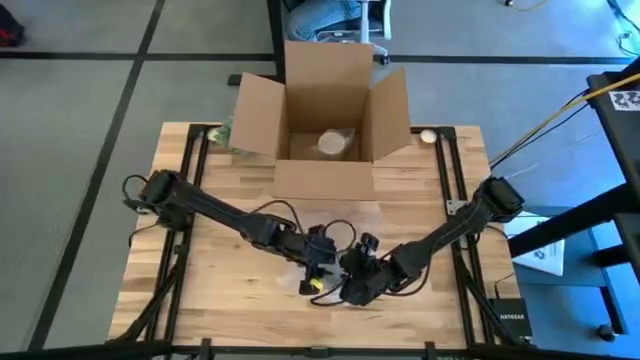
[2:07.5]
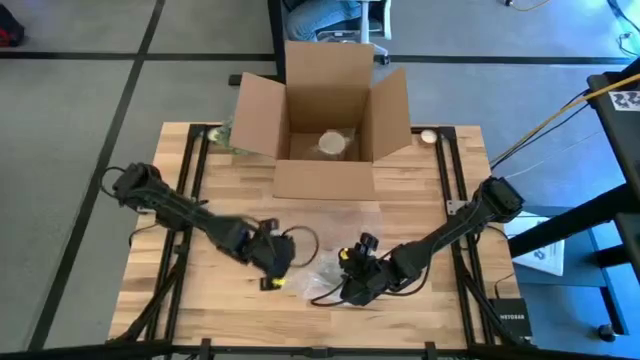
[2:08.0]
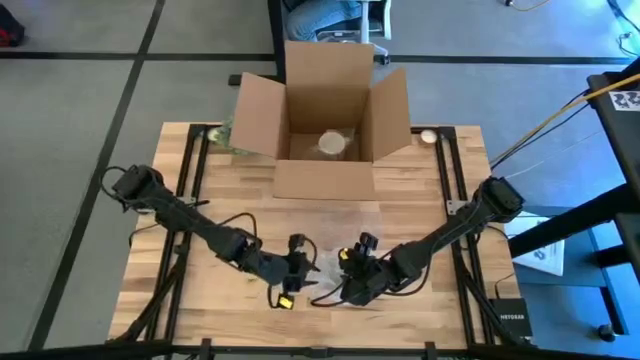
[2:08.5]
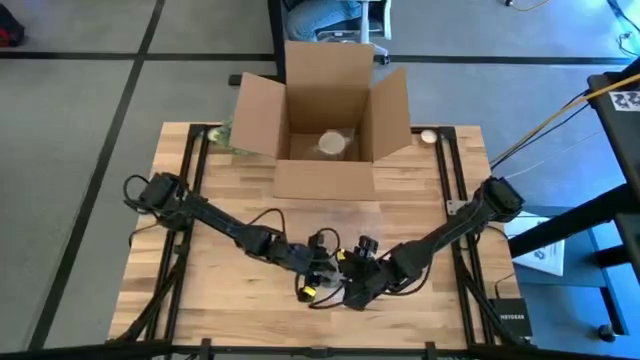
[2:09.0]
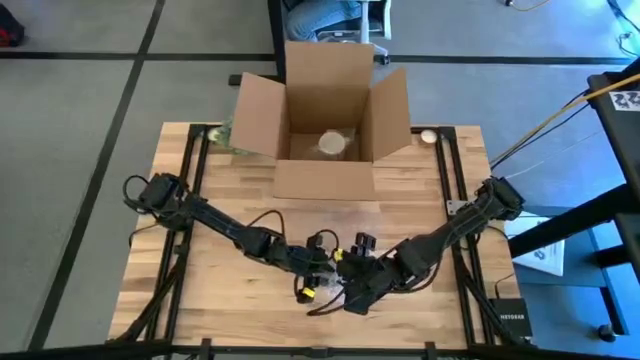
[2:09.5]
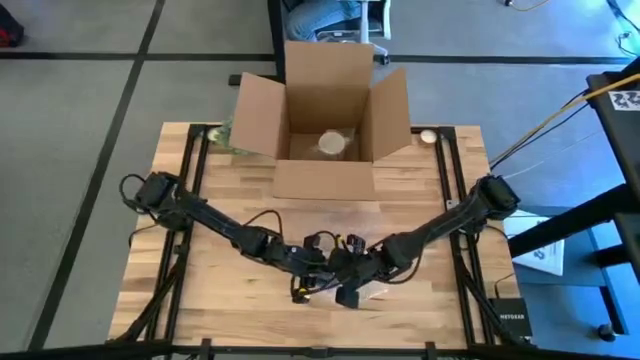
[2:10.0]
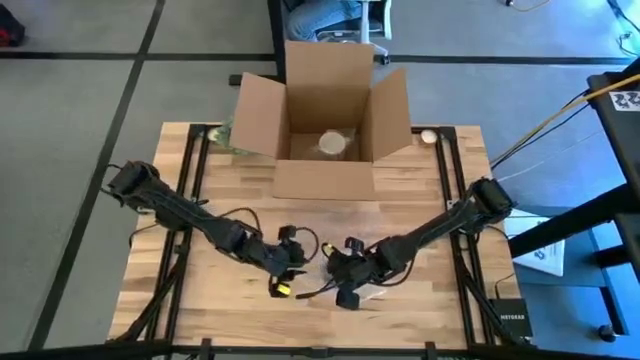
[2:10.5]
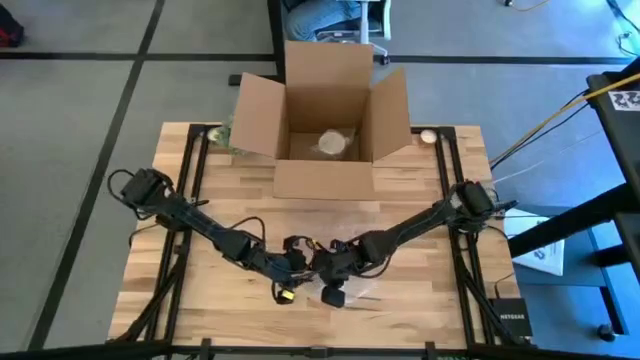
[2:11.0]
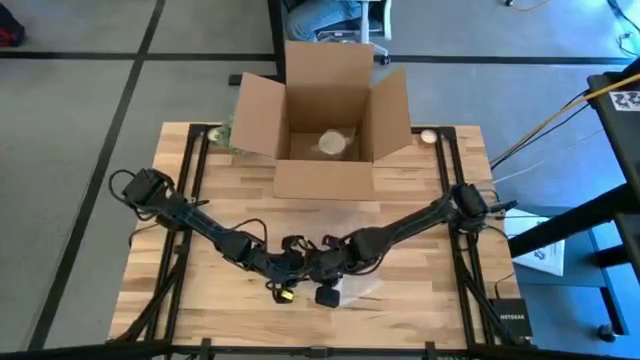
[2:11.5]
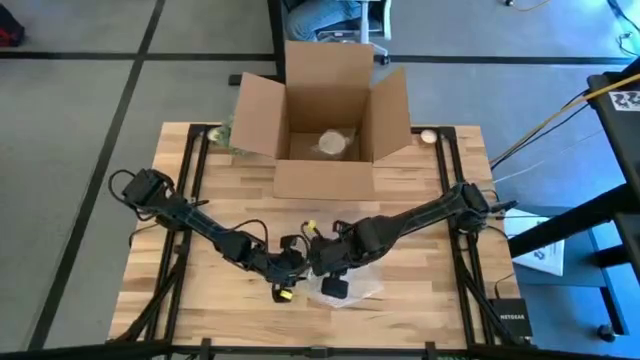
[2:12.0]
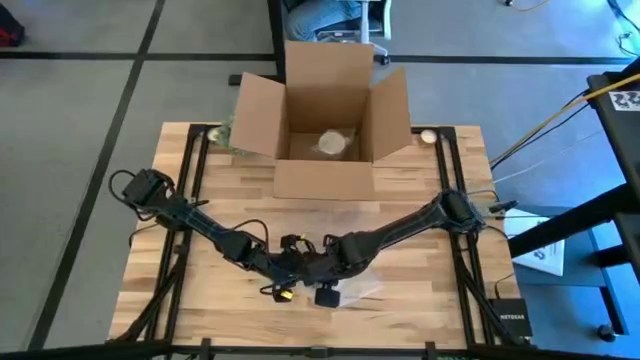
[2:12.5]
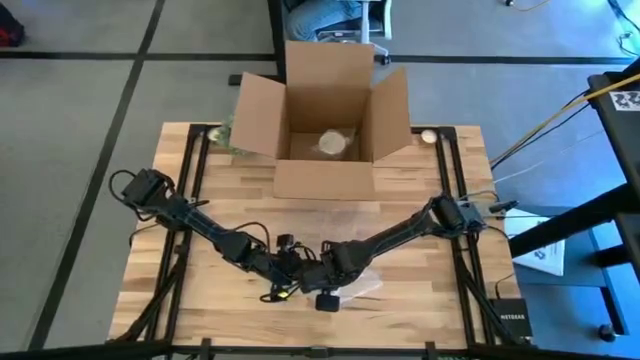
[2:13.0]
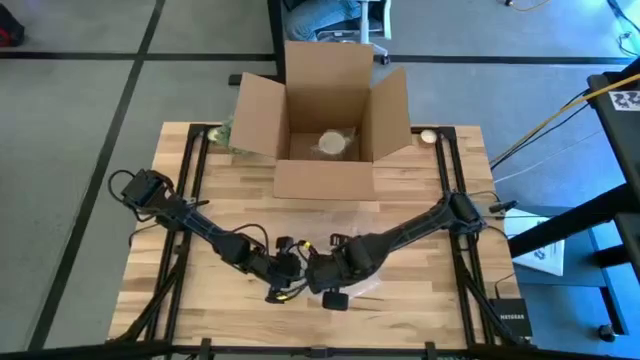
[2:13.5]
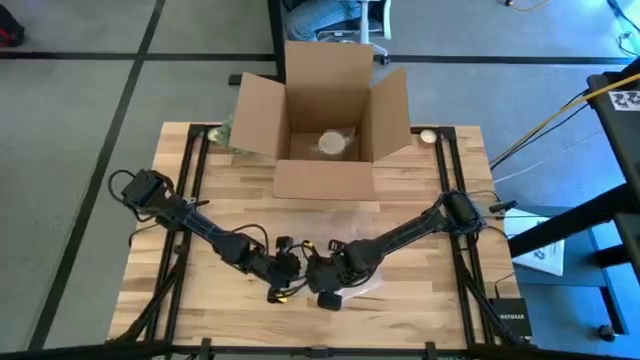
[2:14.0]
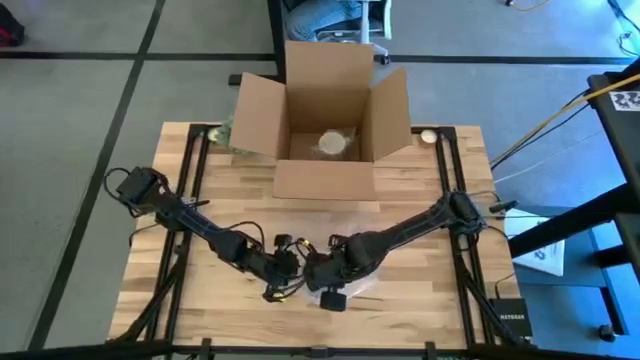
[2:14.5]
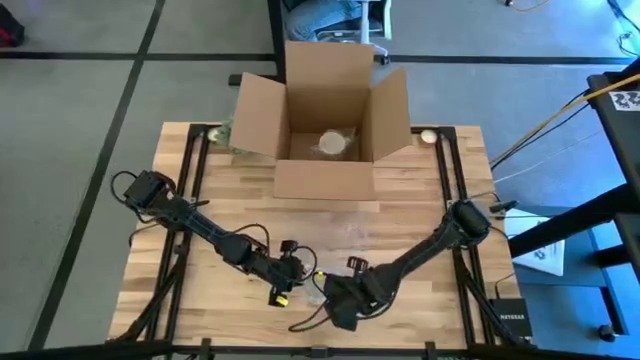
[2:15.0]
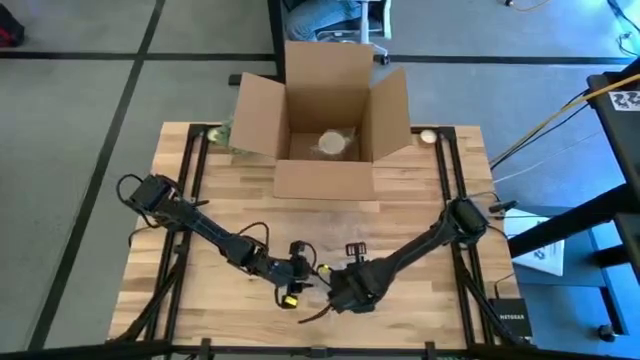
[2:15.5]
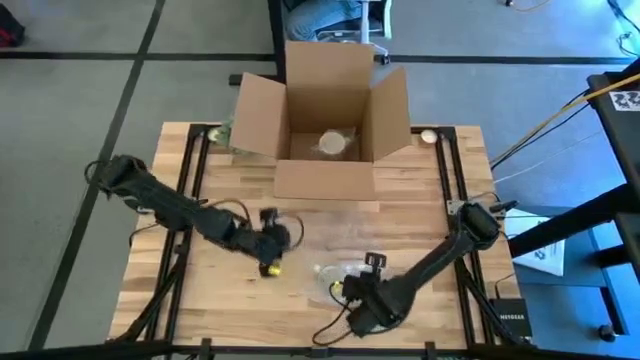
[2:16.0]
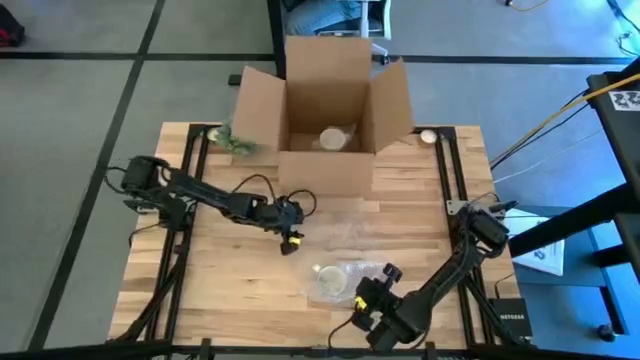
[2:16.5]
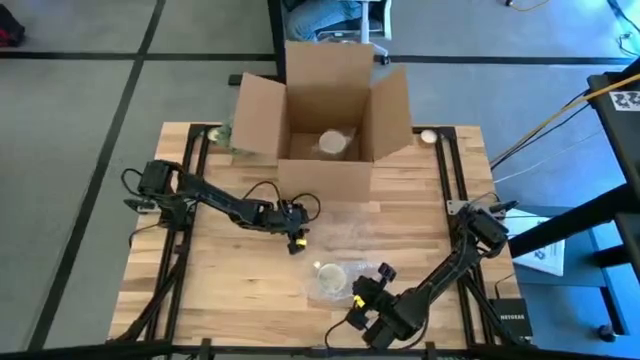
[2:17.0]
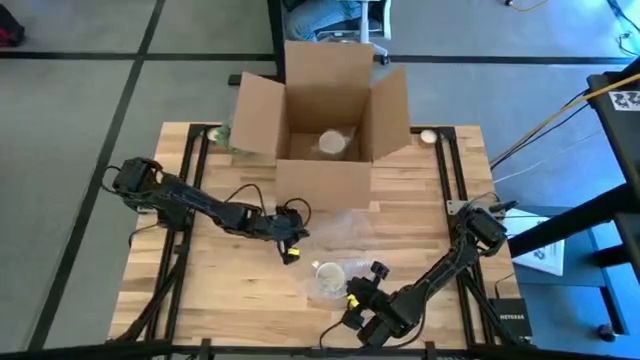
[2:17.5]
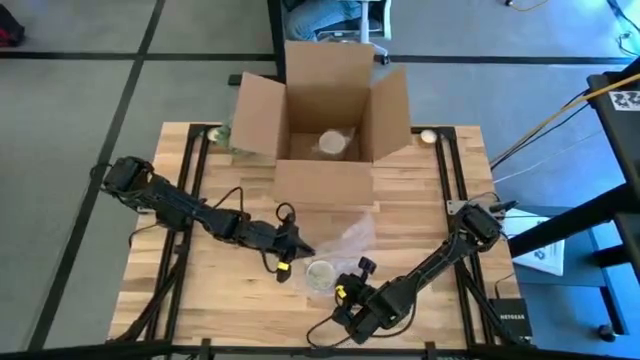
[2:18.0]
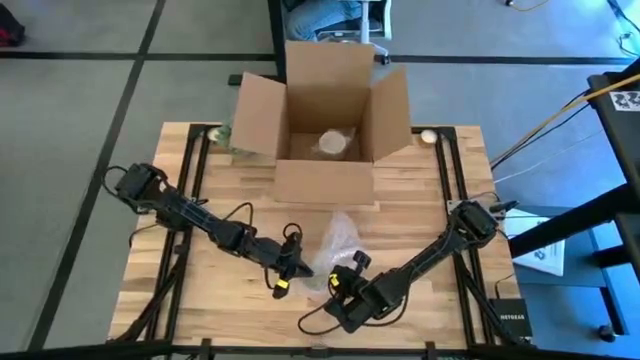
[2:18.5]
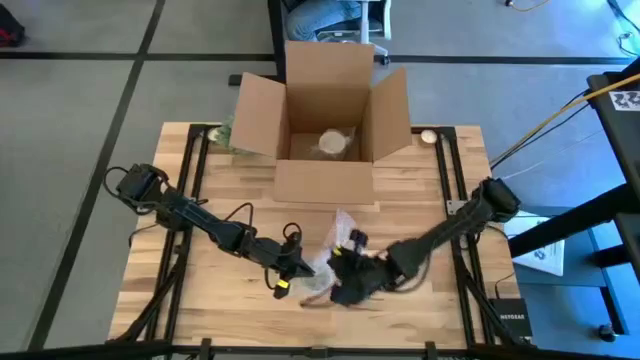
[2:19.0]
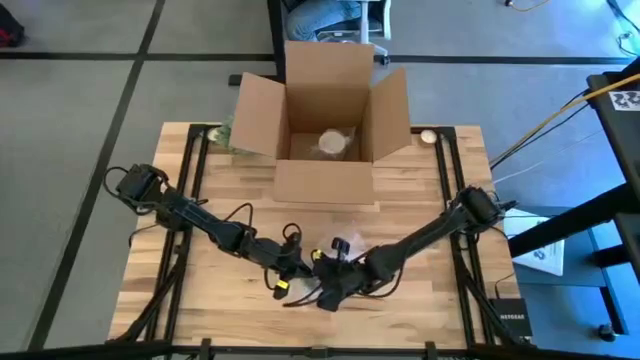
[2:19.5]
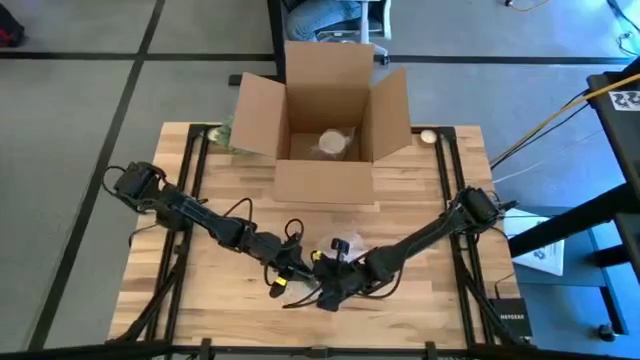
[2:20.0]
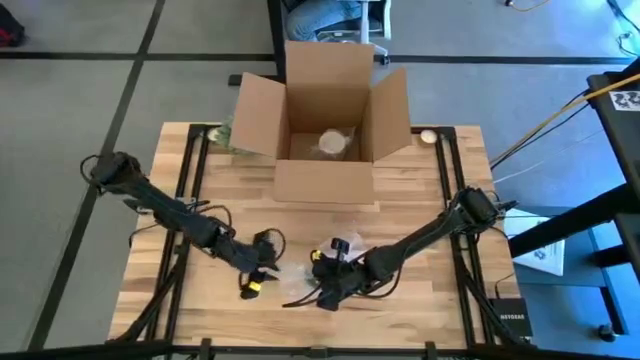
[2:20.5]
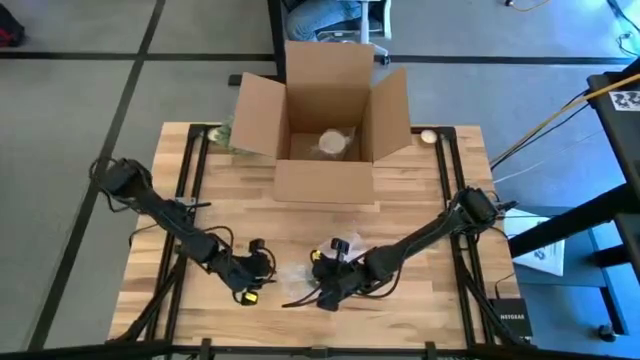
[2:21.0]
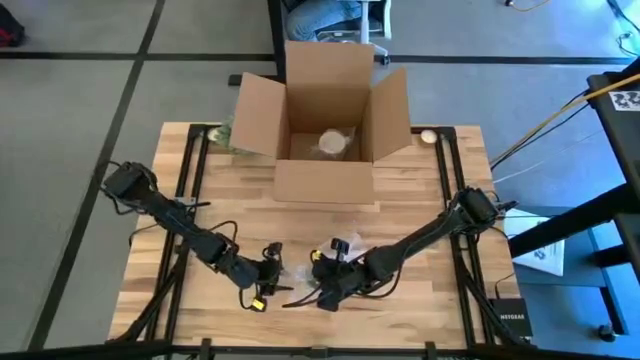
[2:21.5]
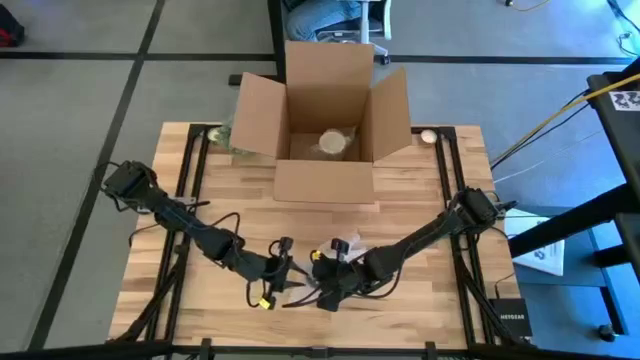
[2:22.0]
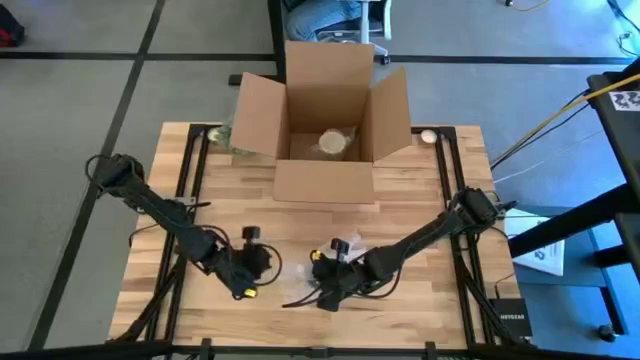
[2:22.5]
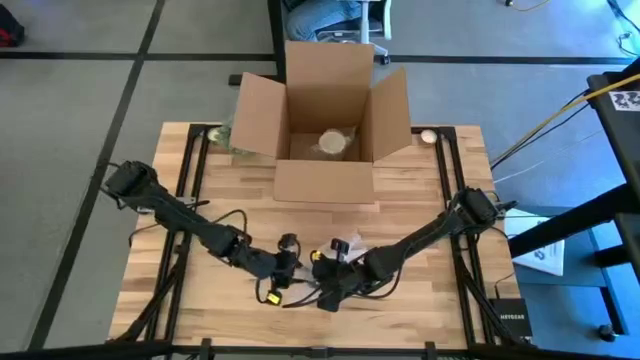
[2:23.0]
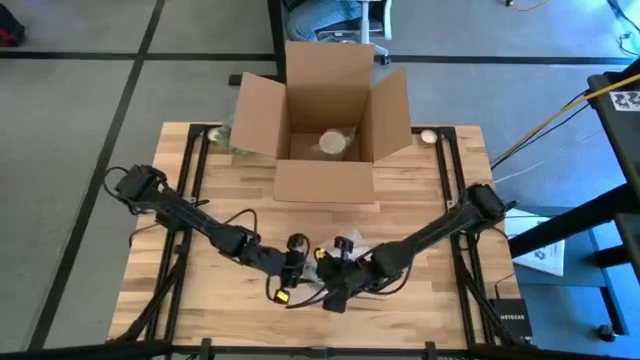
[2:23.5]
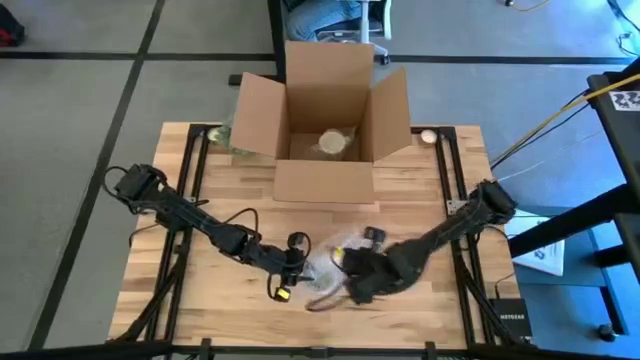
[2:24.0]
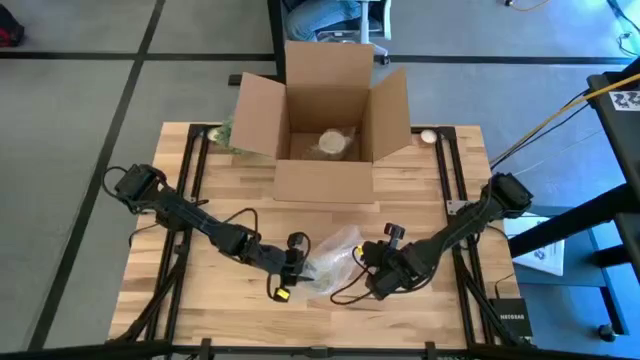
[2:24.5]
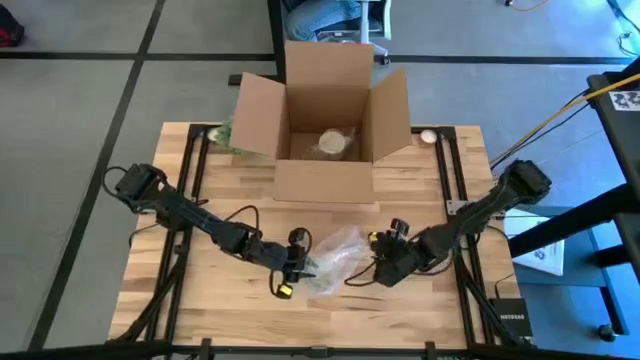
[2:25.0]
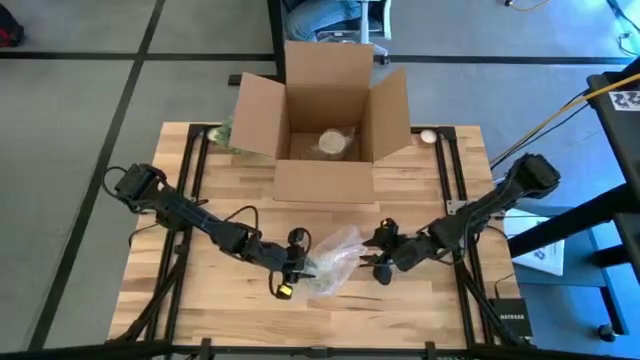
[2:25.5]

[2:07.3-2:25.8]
Task: wrap mug
Wrap the red mug with bubble wrap

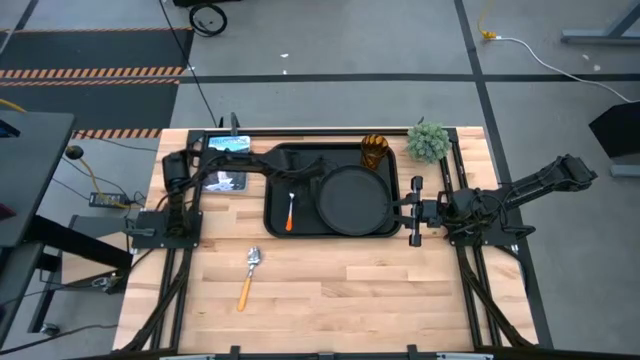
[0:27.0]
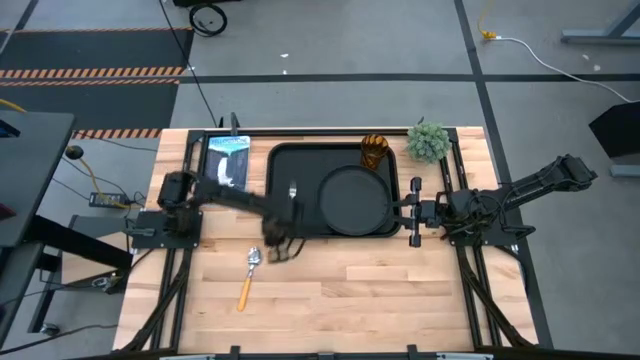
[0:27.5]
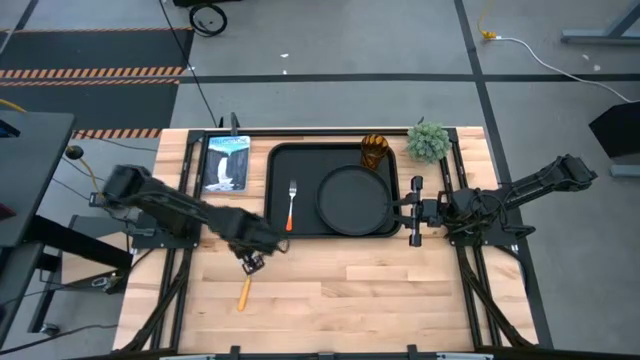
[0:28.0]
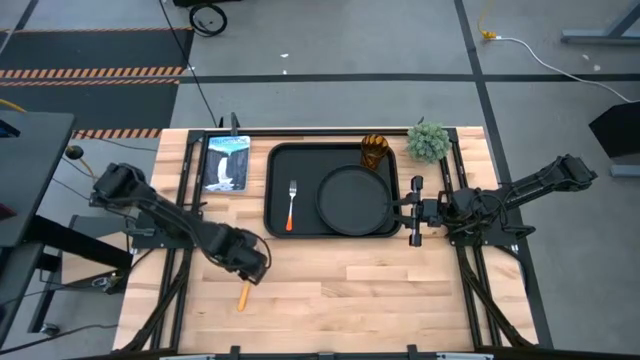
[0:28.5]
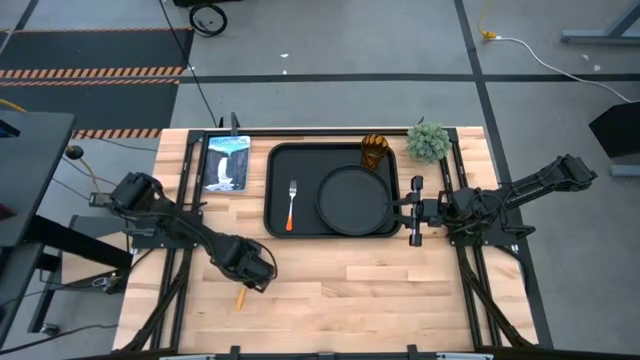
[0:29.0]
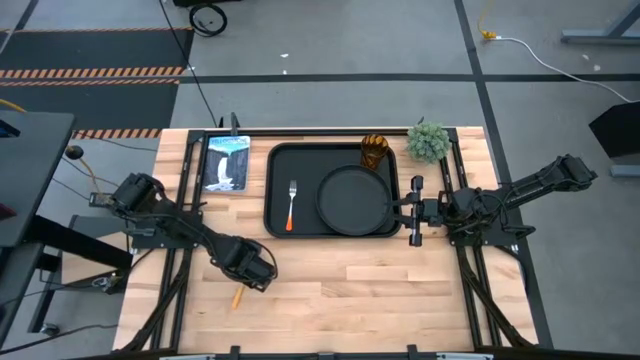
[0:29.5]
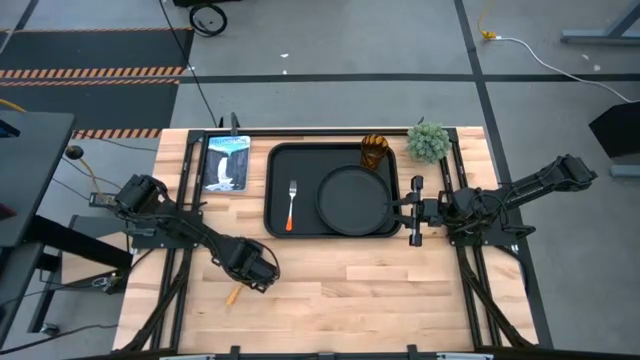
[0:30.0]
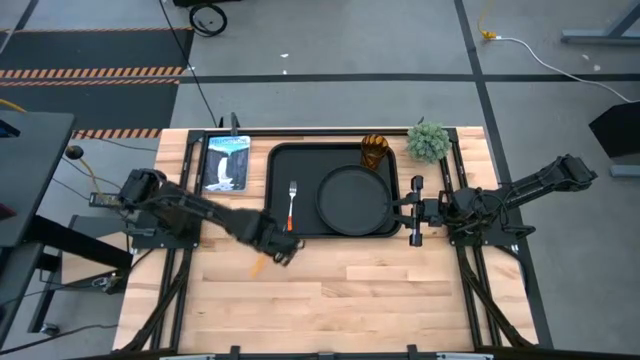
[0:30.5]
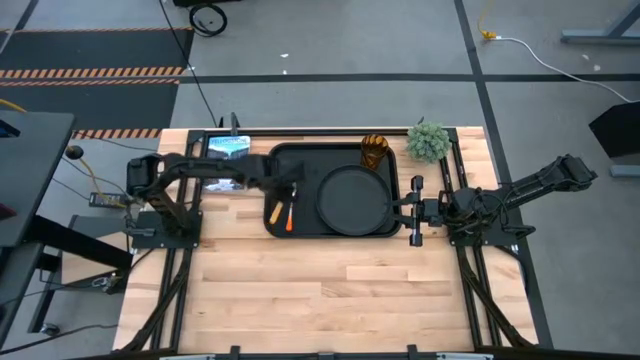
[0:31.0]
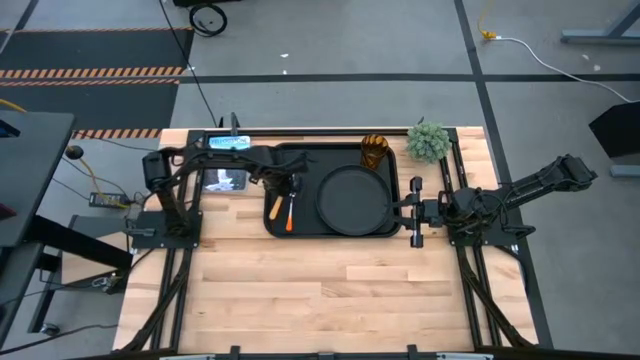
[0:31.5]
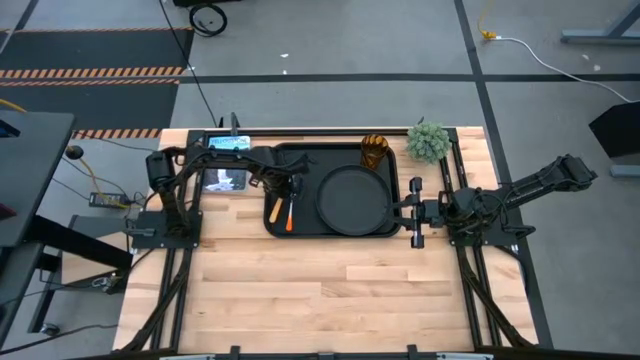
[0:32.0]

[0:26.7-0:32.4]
Task: Pick and place plate/cup/fork/spoon on tray
Put the yellow spoon on the black serving tray beside the orange fork
